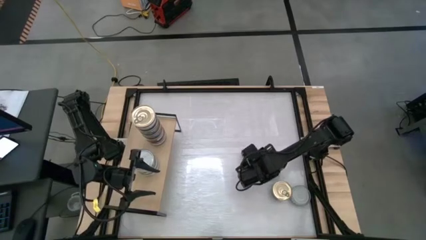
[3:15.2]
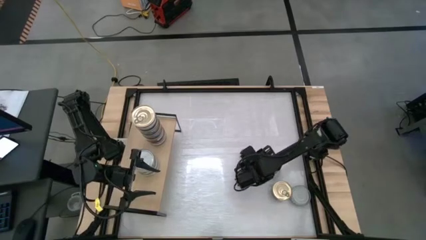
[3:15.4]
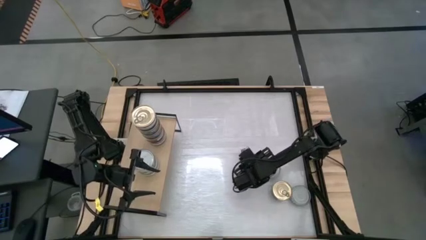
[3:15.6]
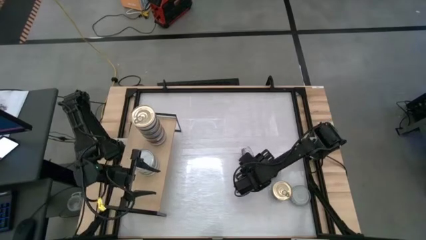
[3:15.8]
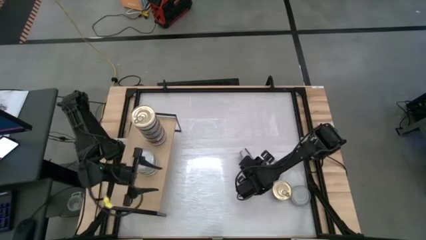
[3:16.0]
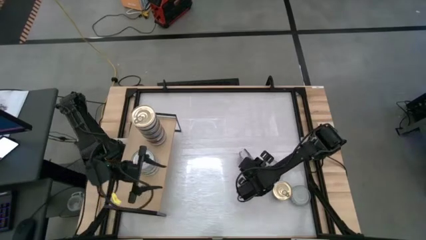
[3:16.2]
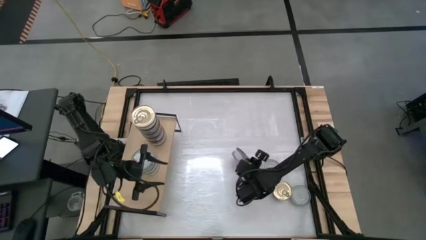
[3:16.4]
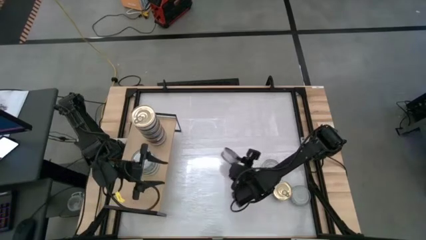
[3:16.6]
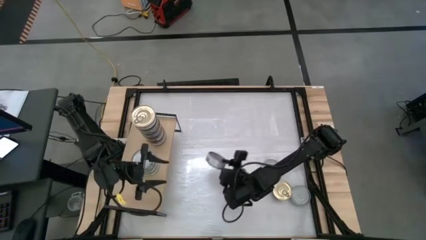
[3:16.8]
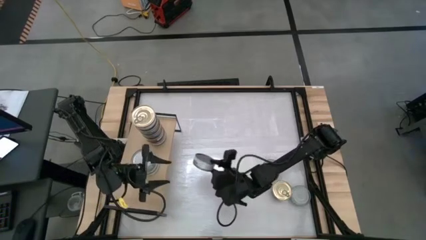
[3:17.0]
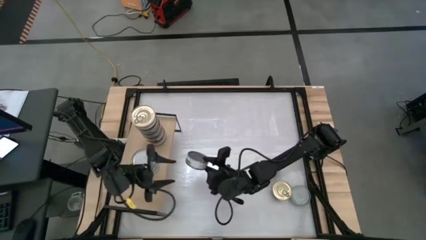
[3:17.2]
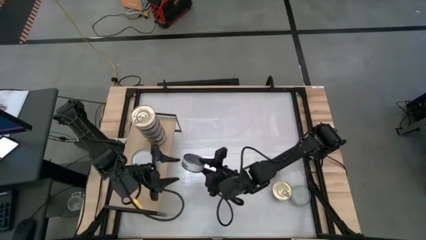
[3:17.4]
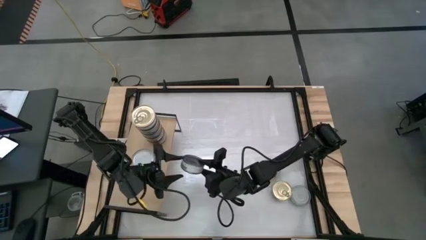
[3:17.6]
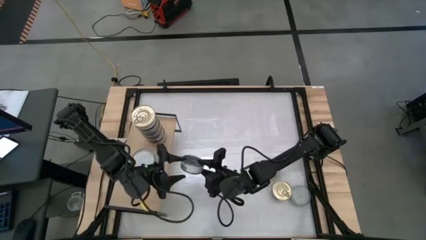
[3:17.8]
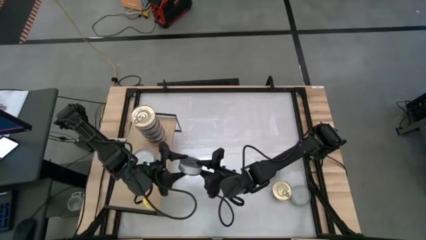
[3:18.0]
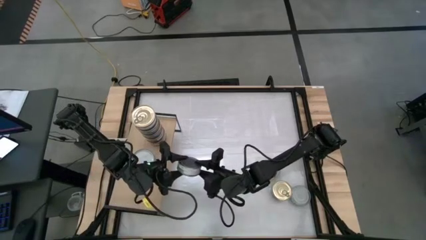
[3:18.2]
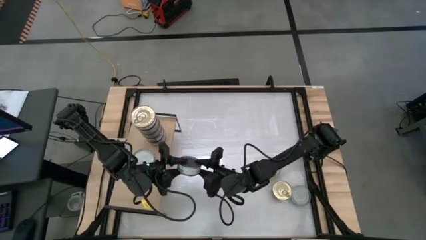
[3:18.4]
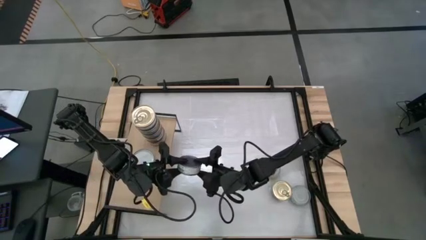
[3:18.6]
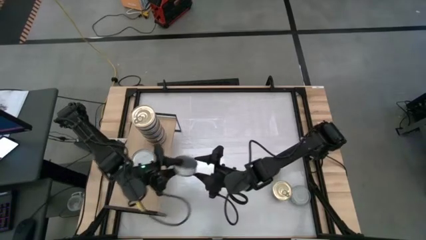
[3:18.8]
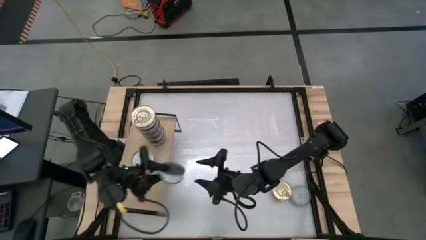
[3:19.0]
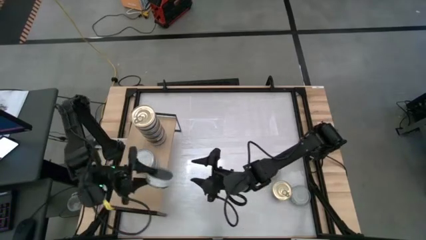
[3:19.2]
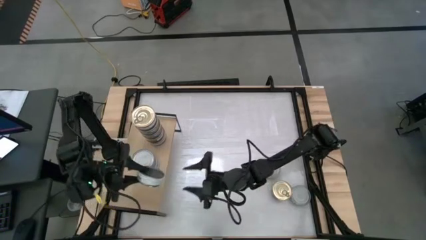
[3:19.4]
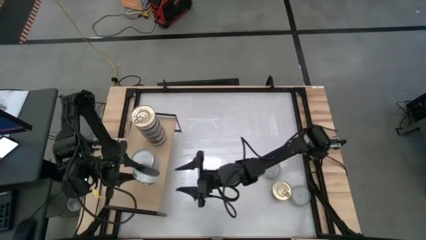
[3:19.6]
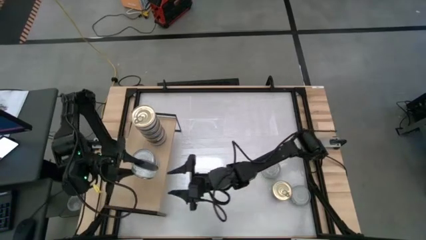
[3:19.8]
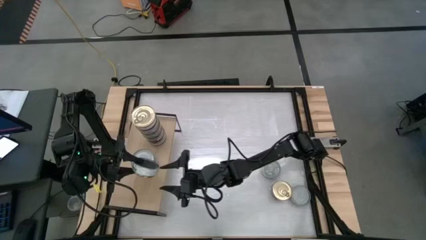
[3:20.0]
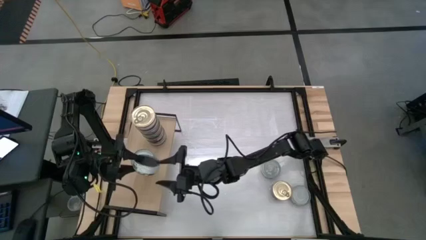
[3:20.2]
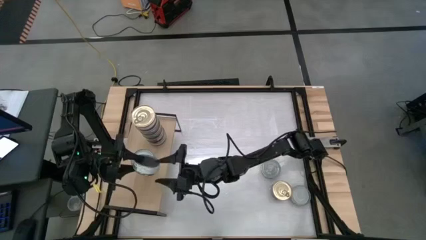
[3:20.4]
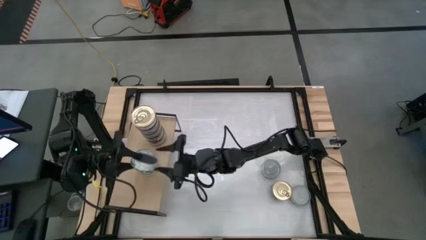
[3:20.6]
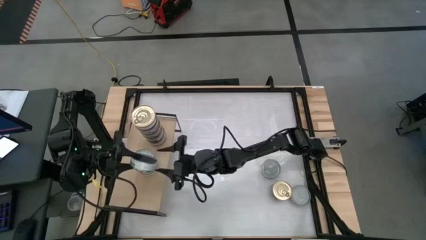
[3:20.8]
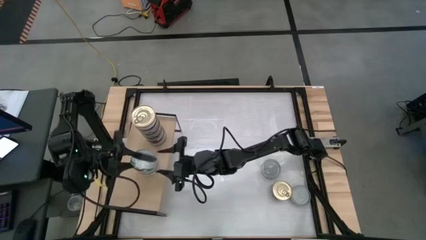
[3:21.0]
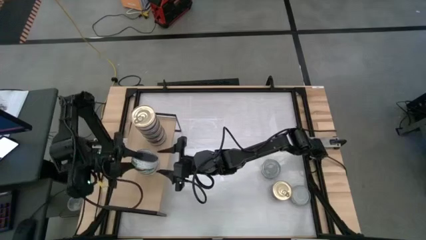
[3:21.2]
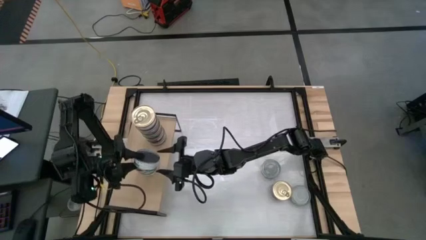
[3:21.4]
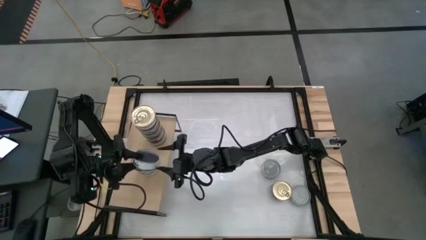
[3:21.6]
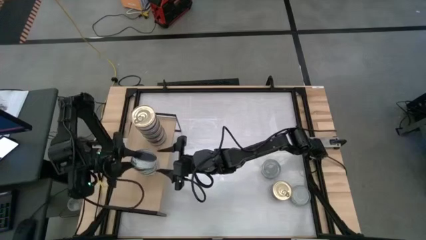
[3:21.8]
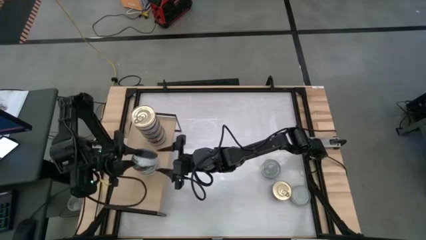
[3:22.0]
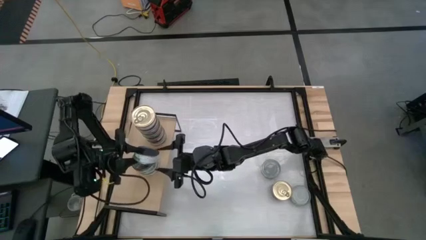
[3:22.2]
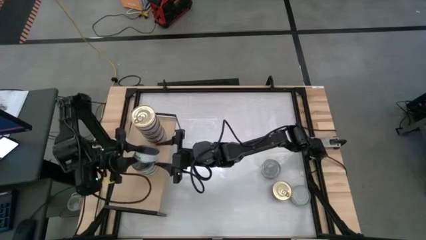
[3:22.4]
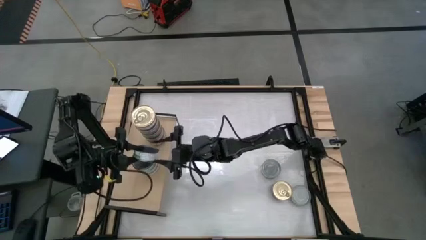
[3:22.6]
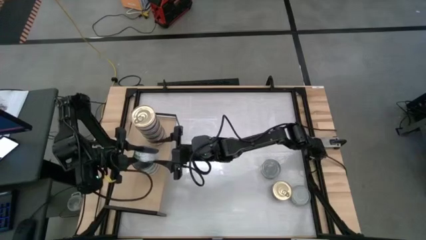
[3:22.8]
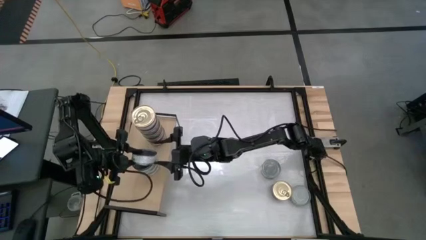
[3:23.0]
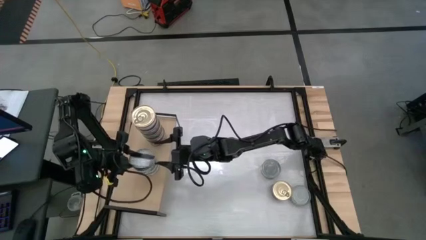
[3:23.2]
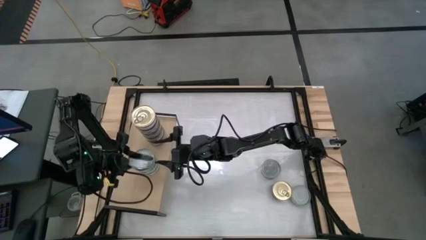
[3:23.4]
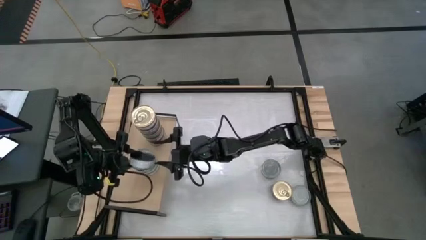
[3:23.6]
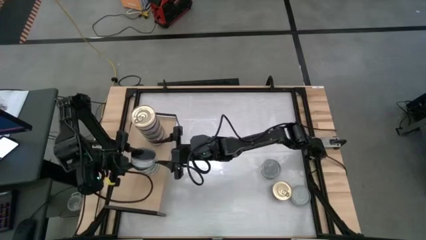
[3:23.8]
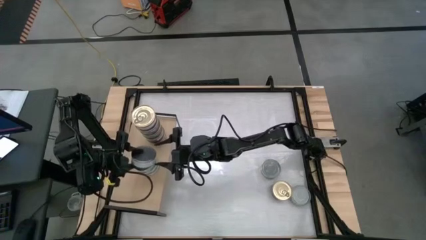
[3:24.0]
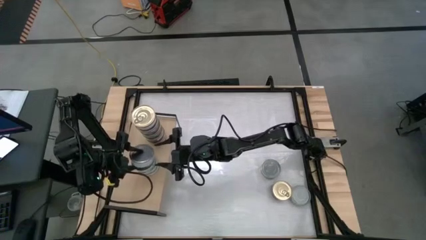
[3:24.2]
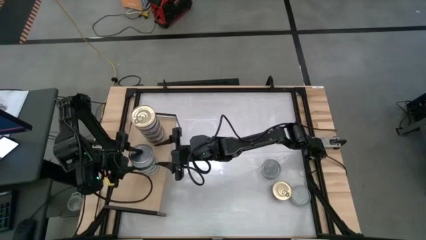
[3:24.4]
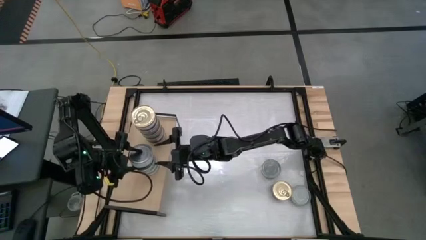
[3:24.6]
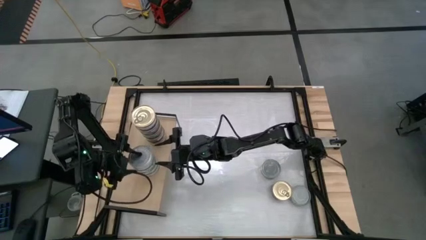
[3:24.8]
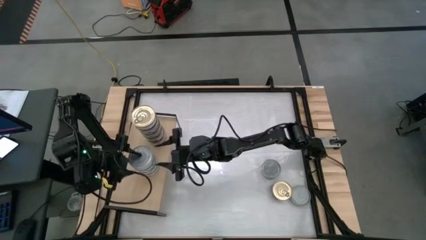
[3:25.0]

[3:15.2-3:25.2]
Task: Stack canned seafood by type on shelf
Stack the green tuna can on top of the green tuna can on the shelf

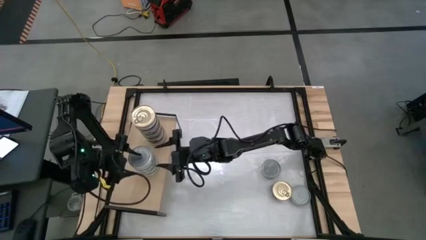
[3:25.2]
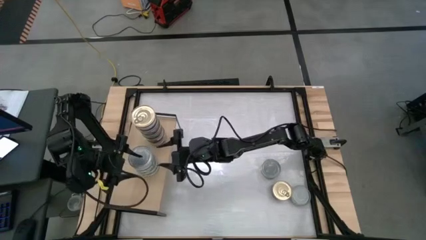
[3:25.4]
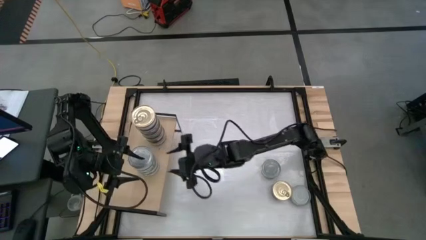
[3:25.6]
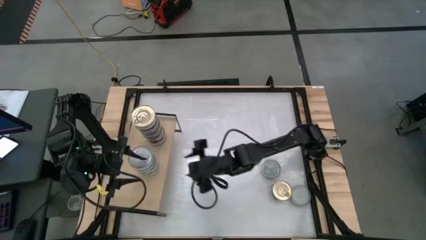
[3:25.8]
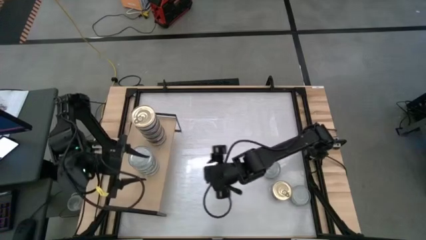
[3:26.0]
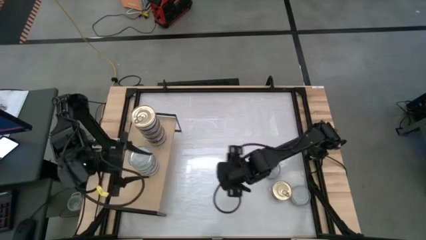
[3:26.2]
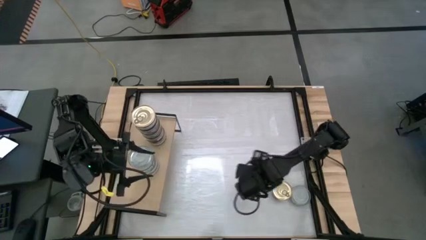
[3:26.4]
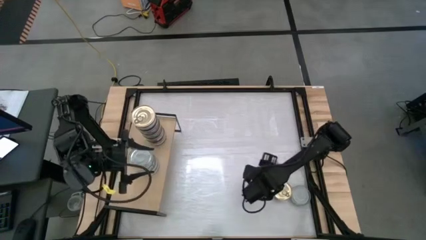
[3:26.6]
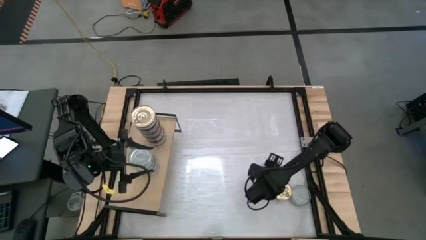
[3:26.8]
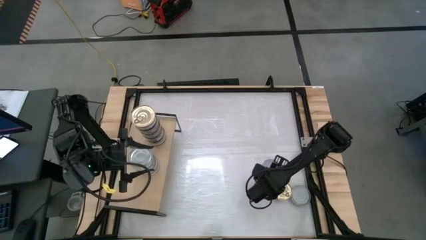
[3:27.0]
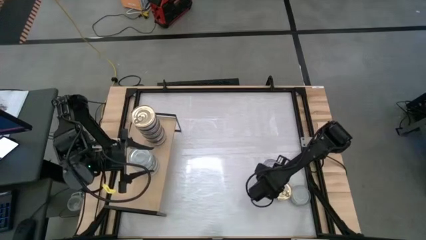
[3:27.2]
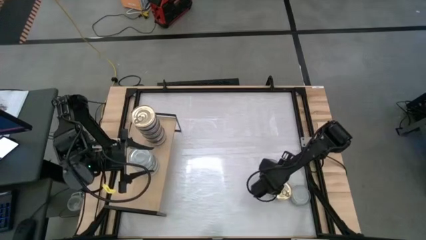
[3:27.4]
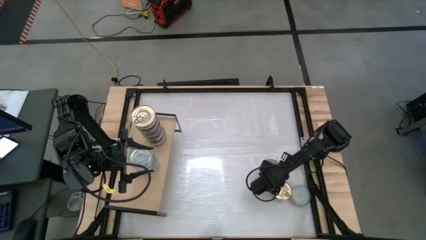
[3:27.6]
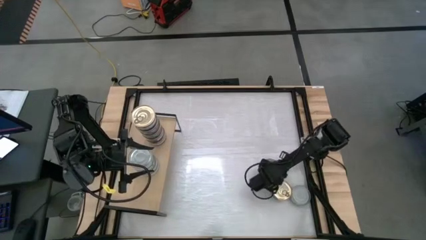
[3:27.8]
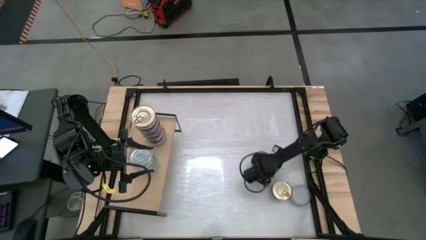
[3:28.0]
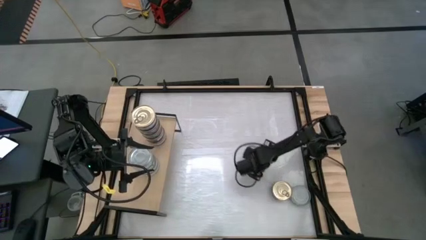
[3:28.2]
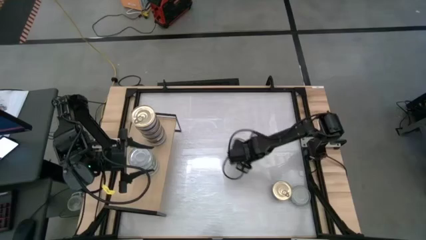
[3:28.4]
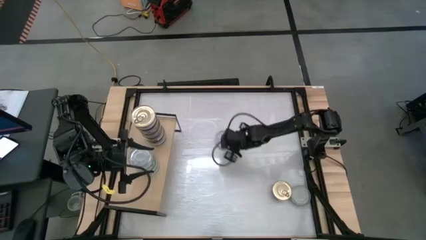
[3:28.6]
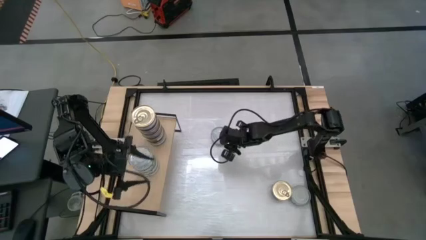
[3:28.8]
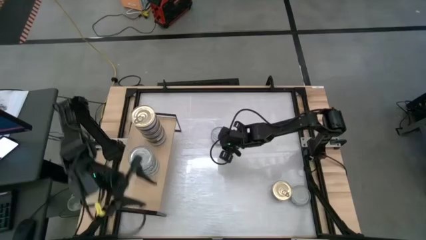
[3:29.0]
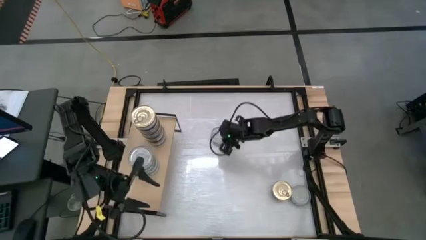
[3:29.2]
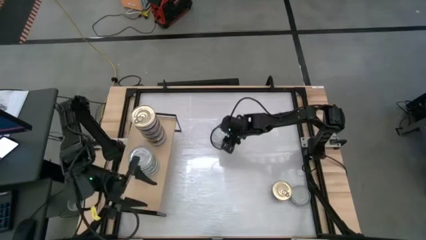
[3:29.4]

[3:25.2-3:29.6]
Move the green tuna can to the top middle of the table

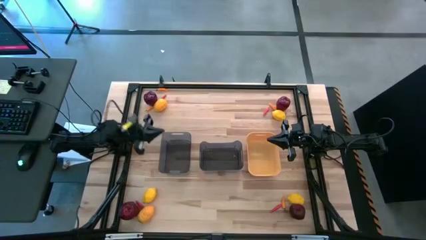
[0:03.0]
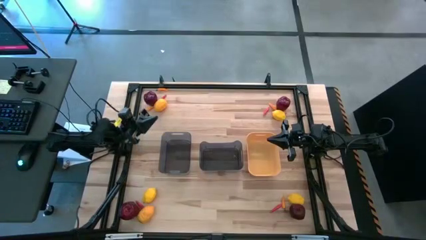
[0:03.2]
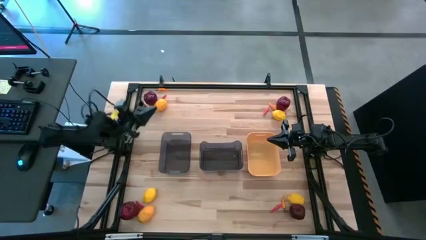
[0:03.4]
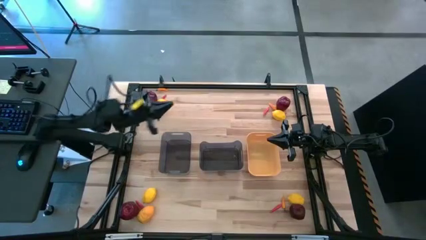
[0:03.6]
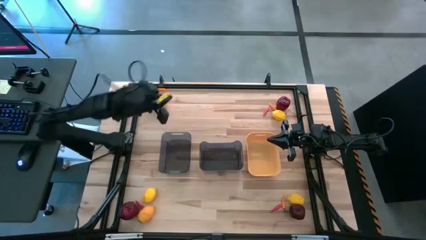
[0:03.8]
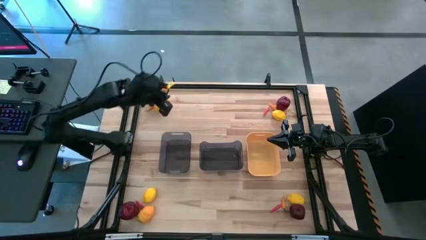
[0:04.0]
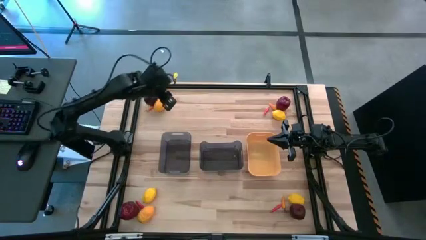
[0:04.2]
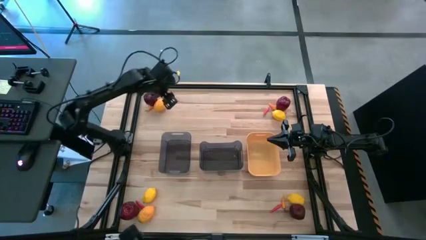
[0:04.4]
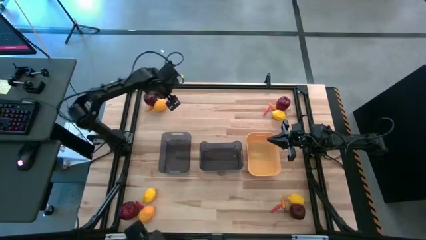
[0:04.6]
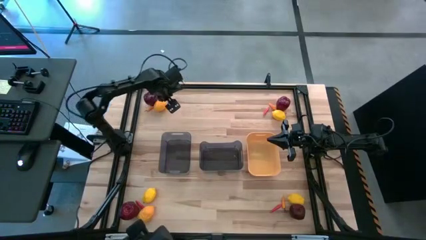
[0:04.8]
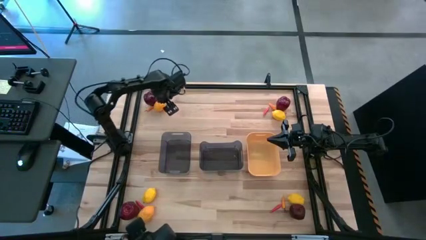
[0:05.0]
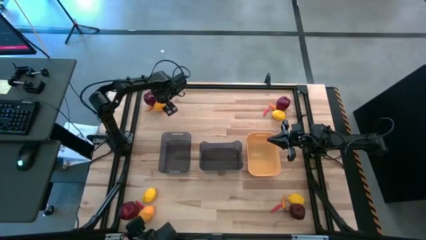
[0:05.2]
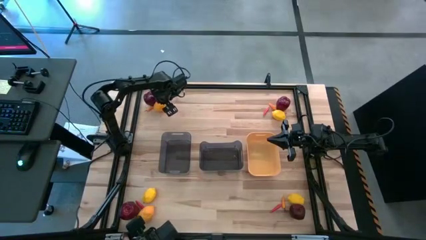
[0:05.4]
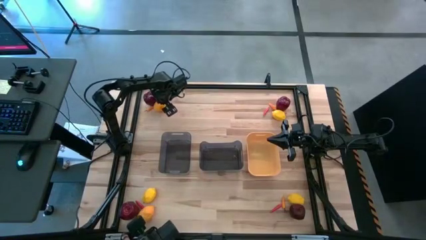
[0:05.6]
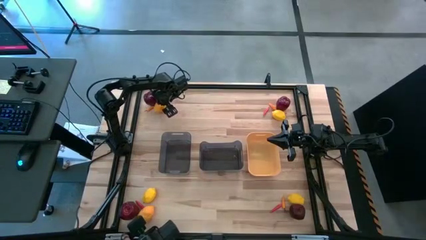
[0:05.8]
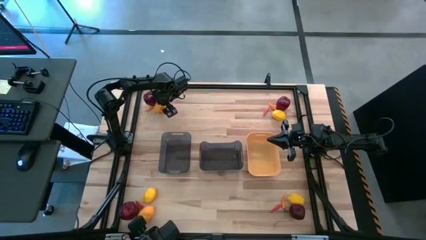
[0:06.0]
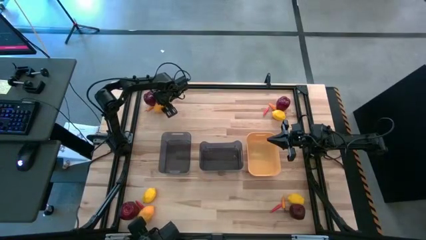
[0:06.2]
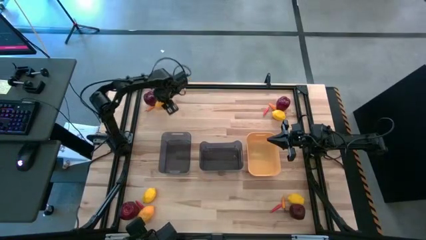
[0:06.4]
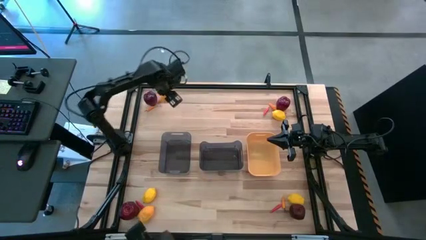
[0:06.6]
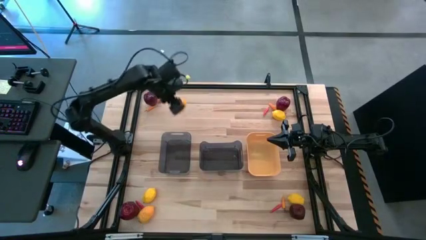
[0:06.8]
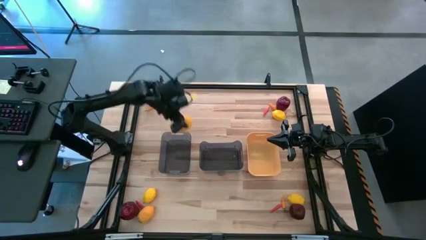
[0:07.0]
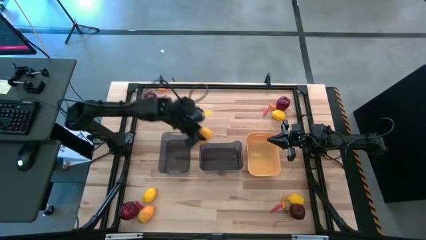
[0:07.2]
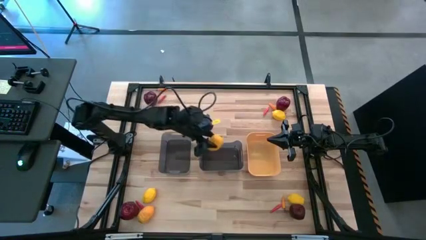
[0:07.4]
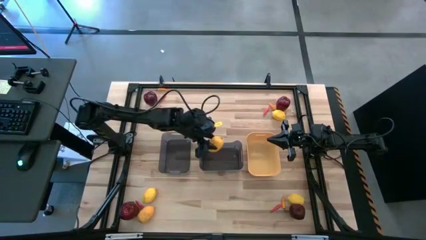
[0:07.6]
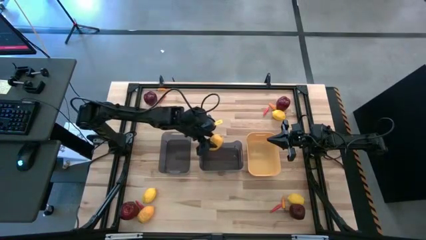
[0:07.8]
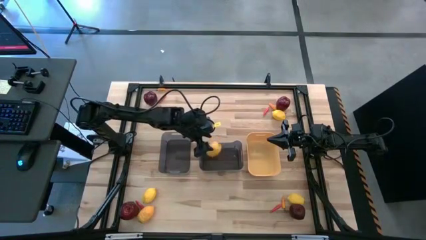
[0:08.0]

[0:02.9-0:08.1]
Task: Sort produce into baskets
Put the lemon into the right black bin
